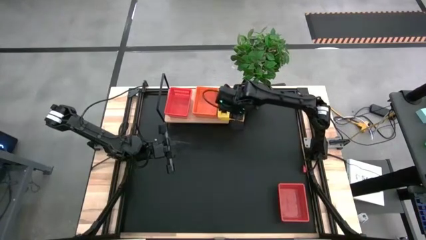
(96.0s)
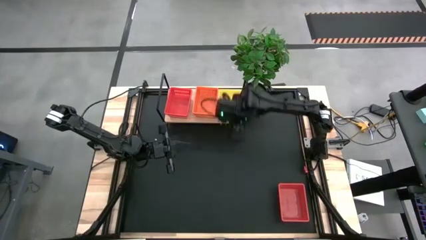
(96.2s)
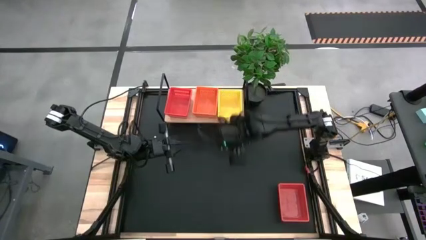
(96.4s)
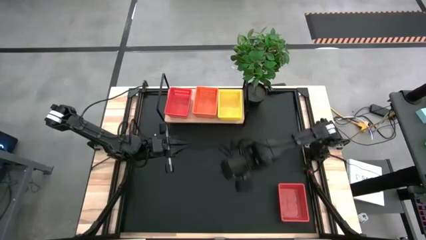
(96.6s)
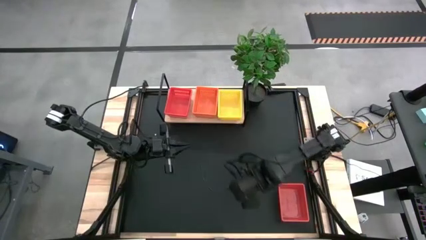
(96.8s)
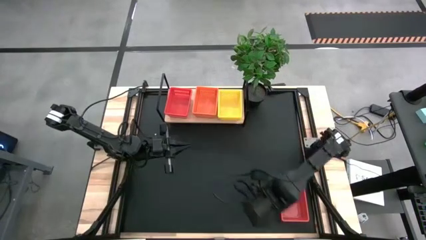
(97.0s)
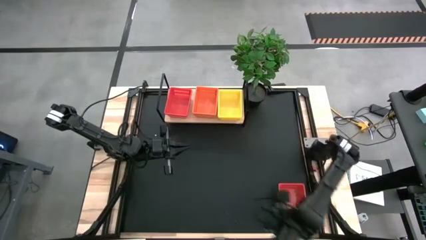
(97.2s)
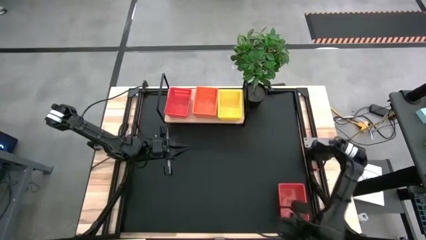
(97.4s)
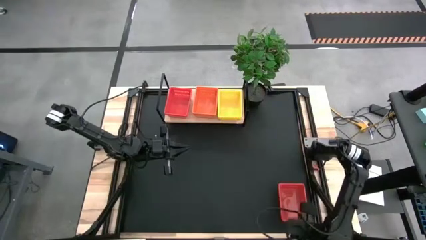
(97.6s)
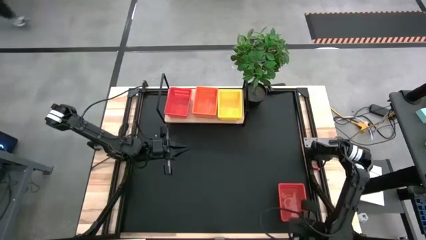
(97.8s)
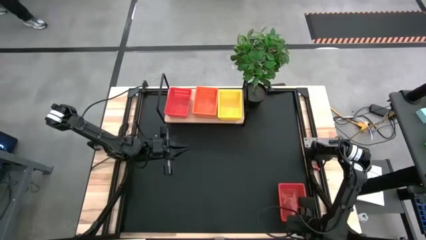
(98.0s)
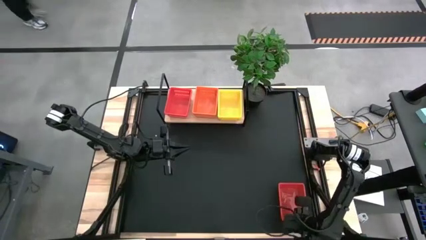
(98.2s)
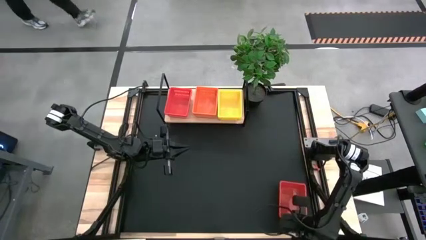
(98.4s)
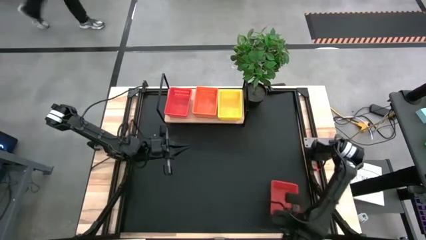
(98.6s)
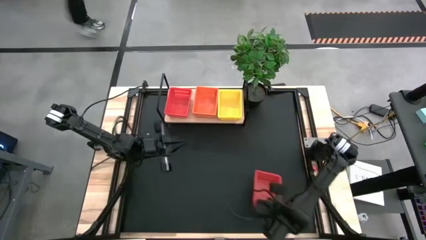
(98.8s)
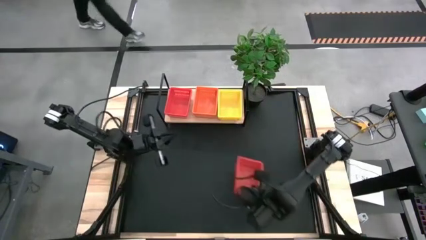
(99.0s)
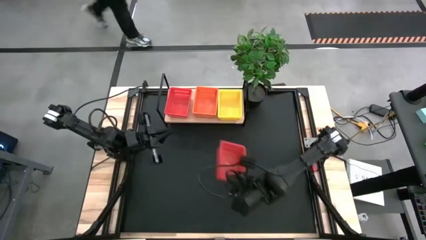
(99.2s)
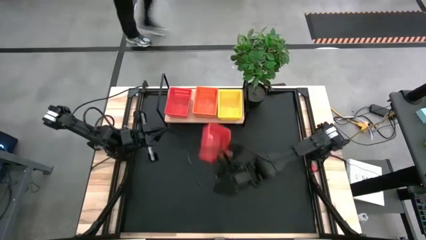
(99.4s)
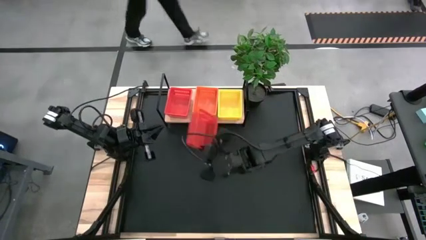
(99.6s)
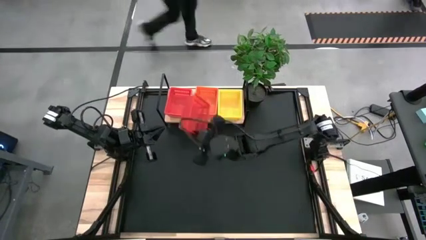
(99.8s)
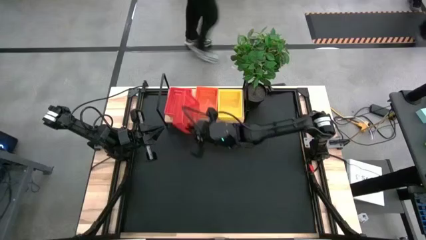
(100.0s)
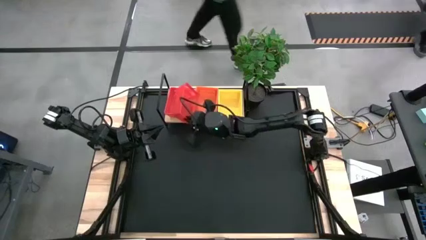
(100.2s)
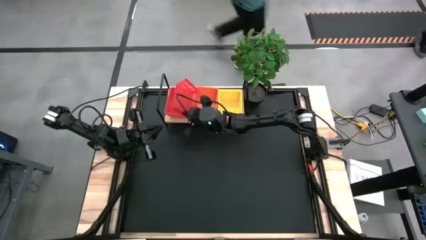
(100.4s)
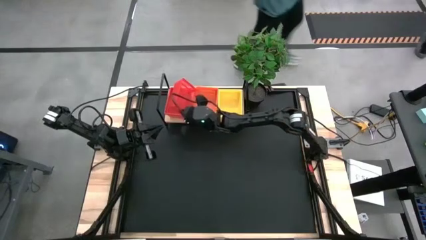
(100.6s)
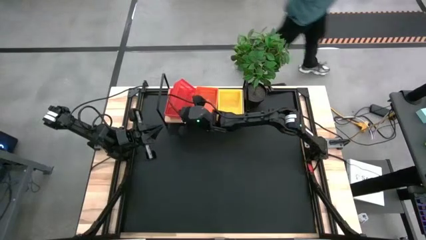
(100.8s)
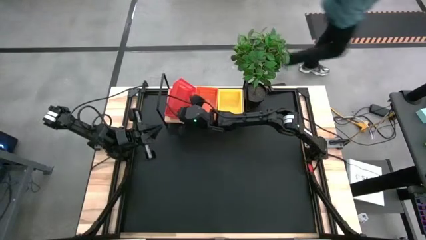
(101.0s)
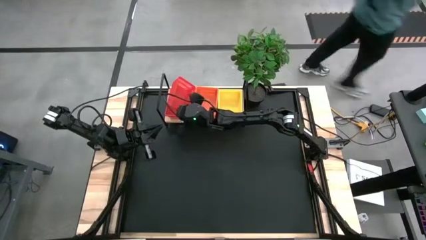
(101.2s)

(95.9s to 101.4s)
Task: Stack baskets on shelf by color
Stack the red bin on top of the red bins on the shelf

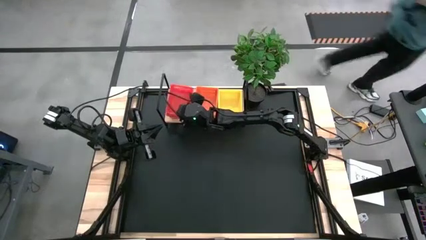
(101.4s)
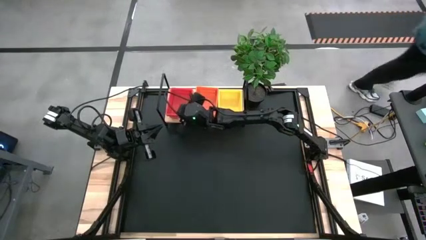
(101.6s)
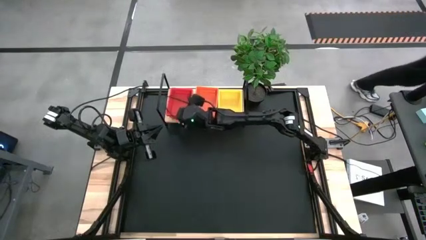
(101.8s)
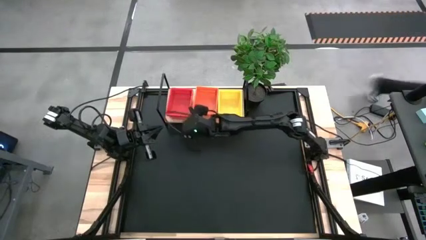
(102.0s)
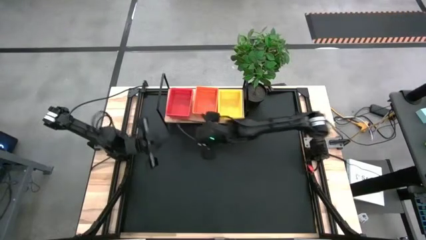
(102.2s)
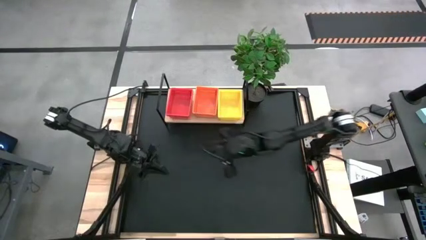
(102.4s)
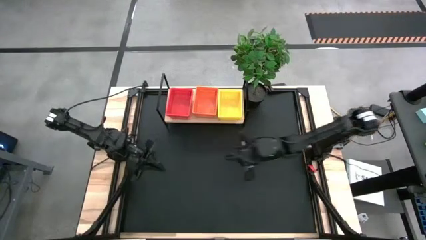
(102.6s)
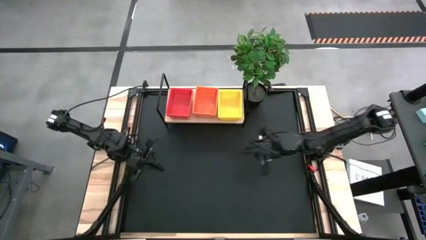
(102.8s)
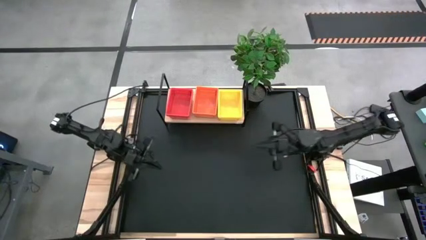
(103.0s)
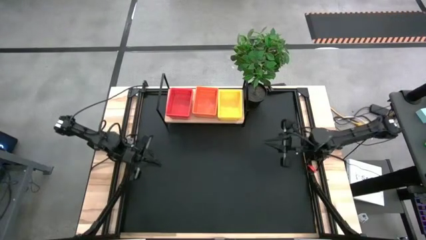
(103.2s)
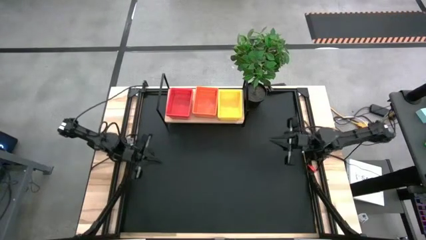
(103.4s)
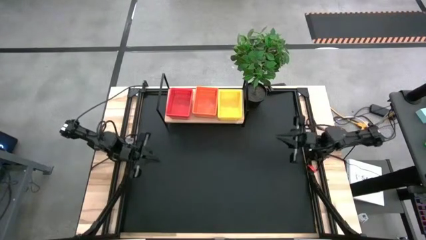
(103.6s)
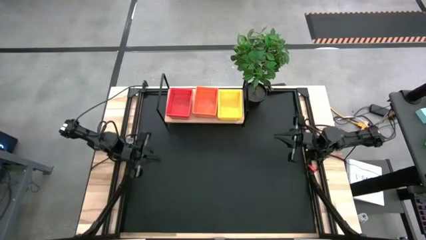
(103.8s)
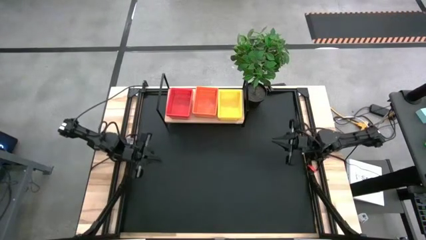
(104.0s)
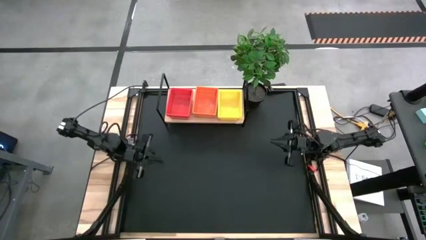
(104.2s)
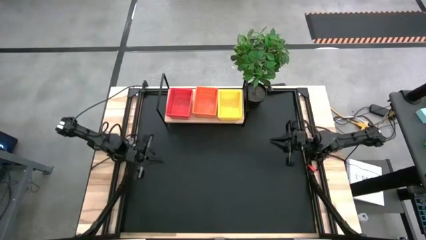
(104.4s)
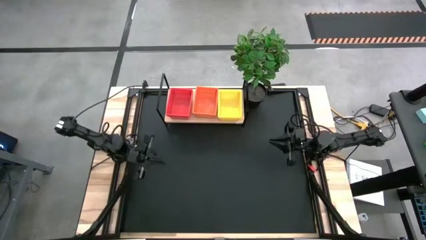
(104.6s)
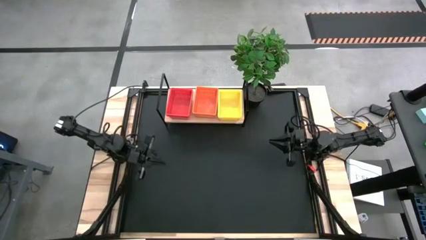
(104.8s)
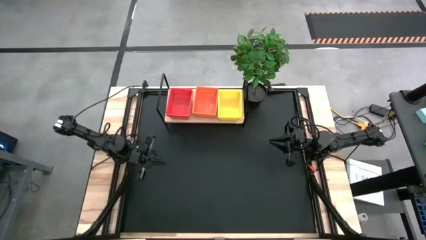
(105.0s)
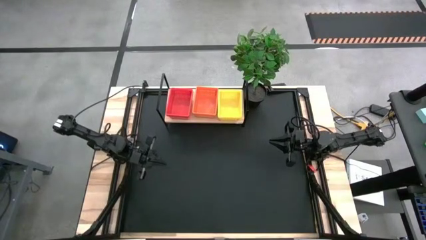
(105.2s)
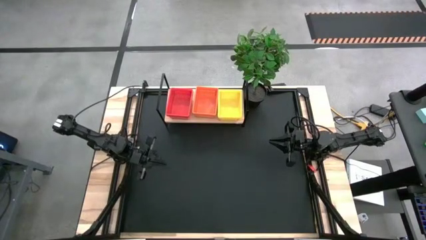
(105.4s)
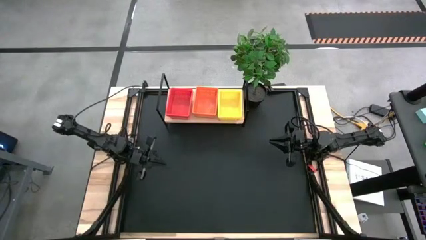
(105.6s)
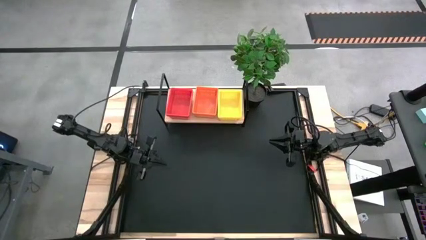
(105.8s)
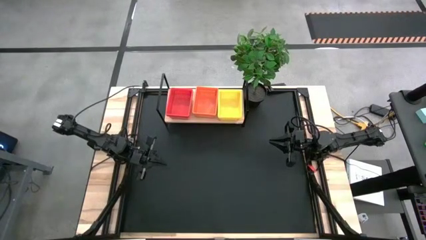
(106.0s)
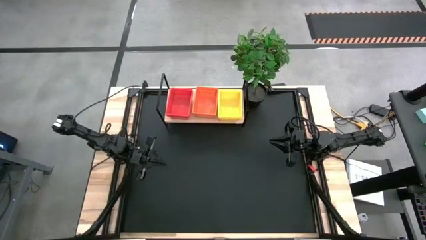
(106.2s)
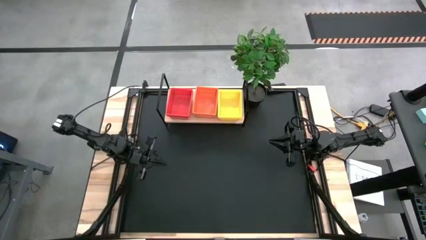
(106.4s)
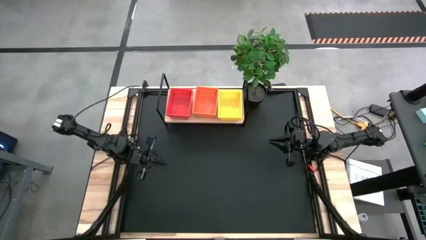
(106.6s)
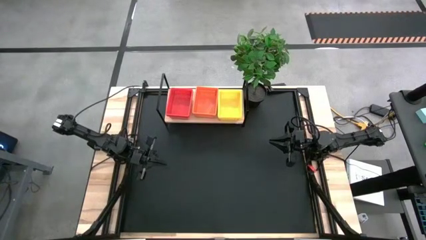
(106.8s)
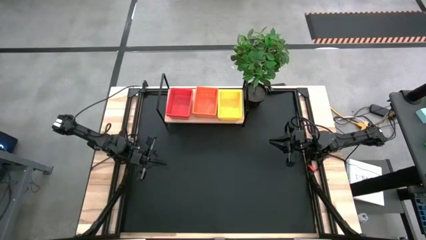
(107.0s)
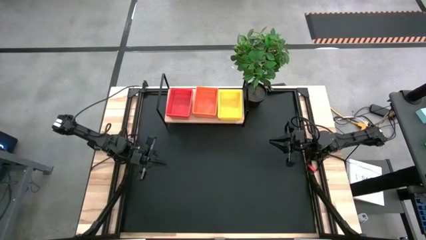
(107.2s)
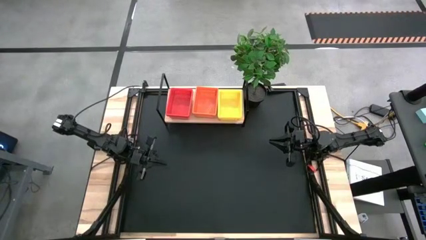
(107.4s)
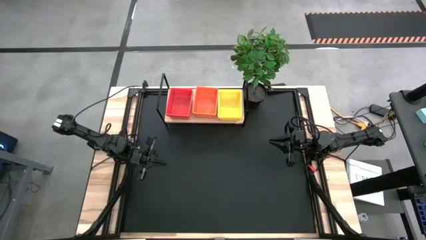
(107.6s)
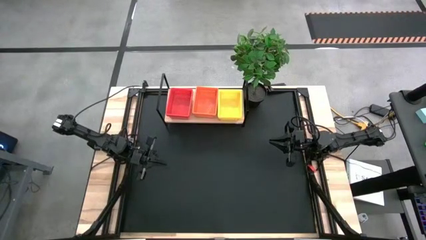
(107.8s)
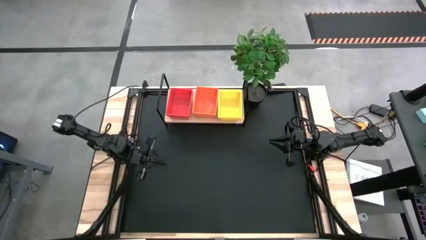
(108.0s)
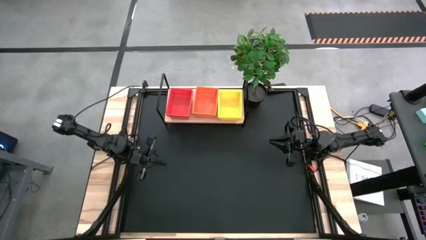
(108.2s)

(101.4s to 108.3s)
Return to Home Position

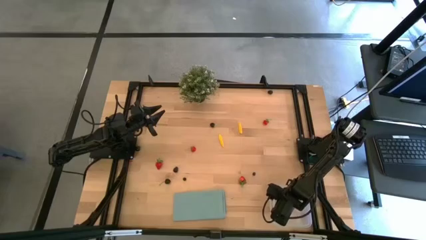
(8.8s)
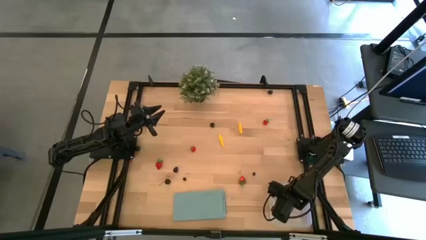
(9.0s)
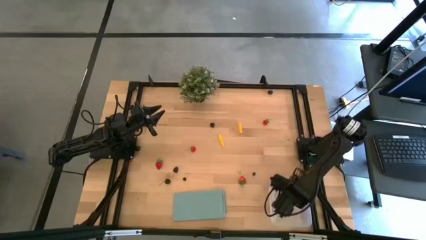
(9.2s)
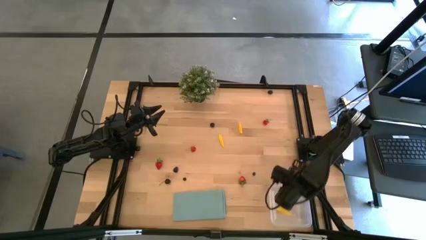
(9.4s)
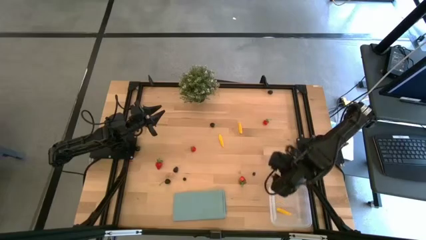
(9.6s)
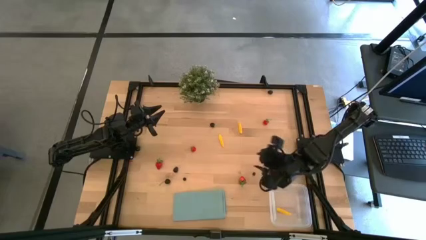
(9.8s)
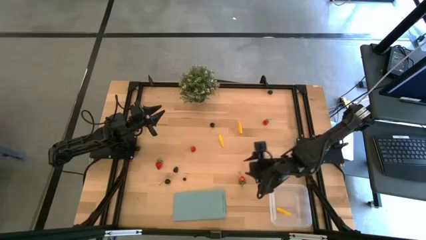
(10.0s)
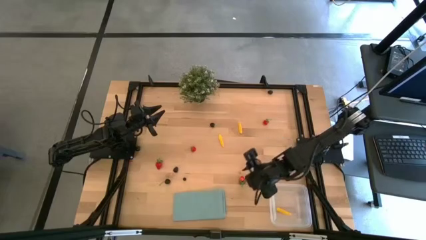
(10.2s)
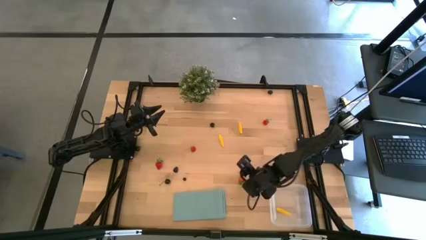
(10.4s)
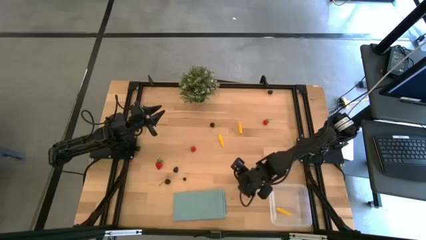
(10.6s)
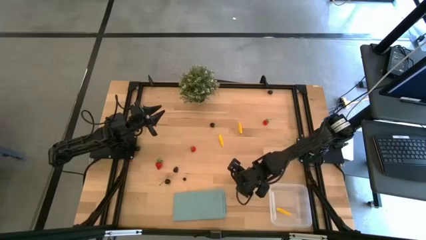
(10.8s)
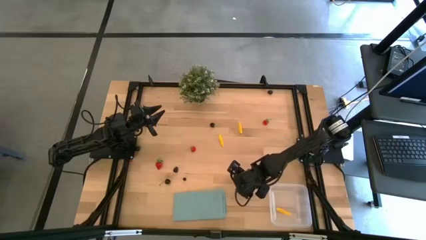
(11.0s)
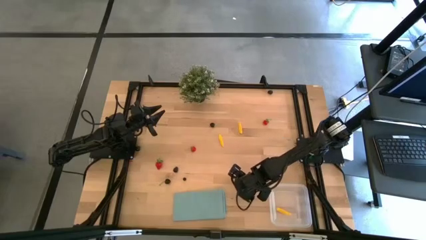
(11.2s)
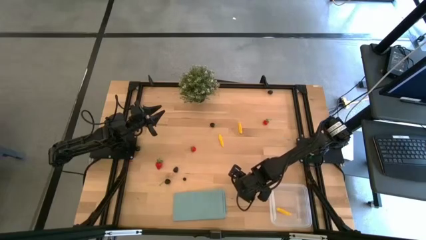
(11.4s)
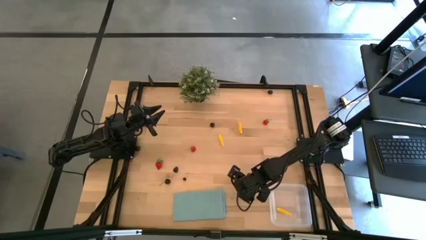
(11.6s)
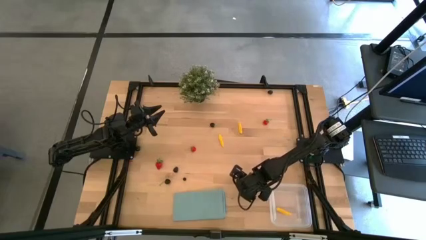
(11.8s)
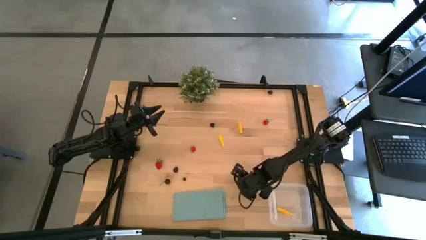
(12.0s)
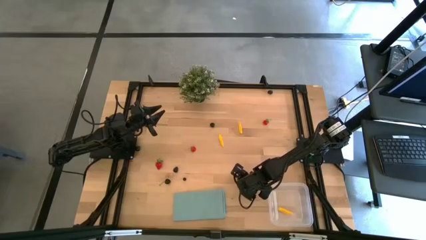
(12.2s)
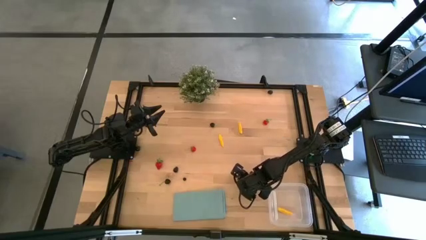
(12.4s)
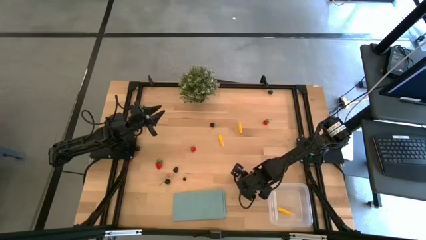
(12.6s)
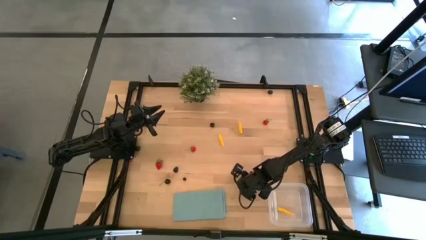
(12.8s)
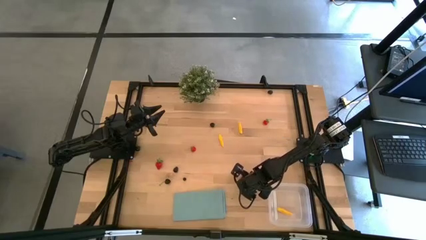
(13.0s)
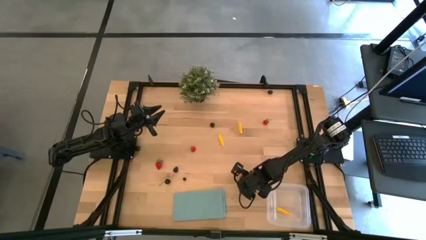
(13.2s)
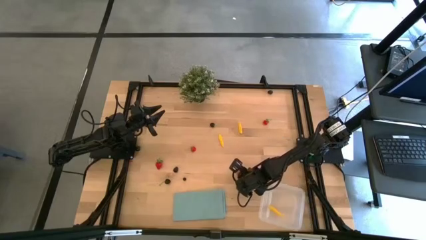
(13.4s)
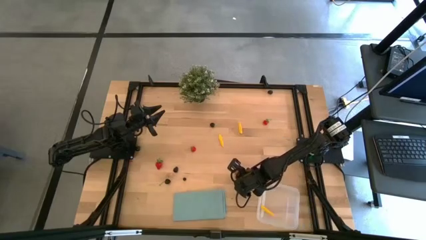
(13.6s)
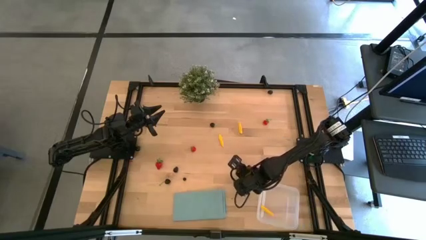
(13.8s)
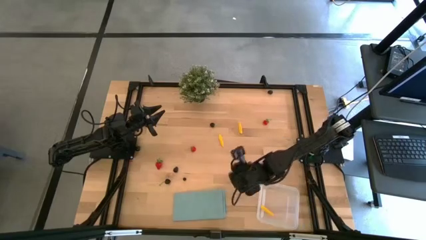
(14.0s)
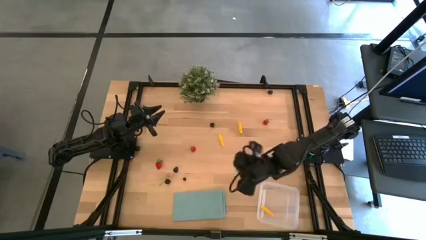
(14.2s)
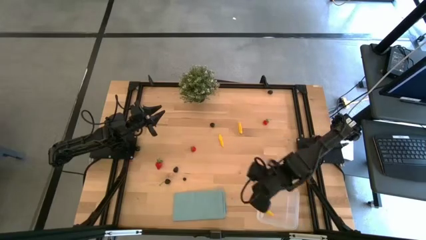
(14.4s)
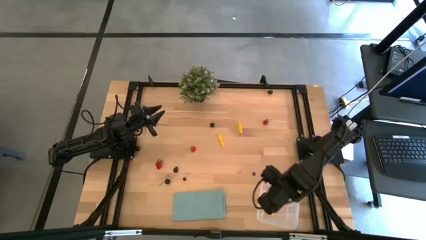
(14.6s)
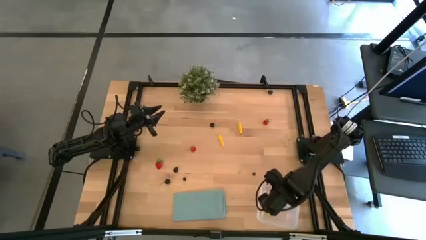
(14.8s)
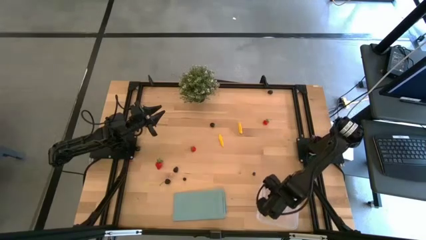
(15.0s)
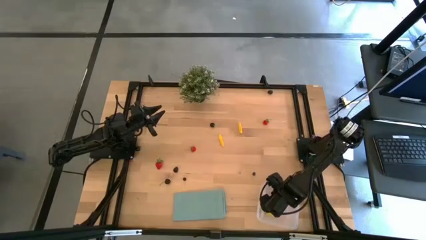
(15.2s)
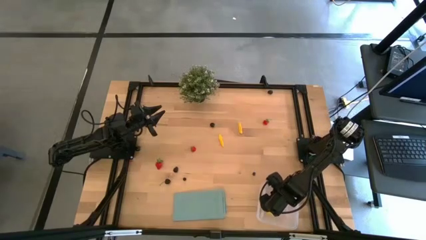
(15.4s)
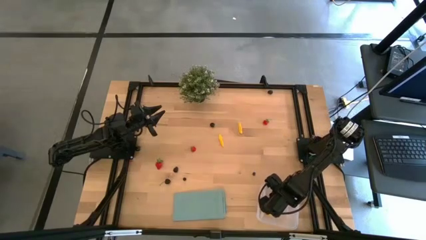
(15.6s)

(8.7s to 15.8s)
Task: Pick and placing Produce into tupperware
Put the red strawberry into the transparent bin
